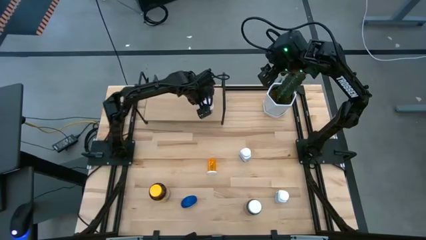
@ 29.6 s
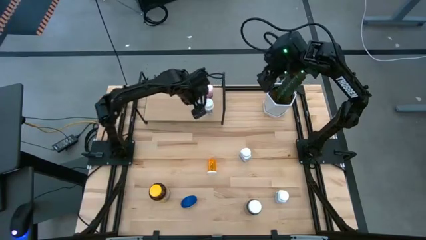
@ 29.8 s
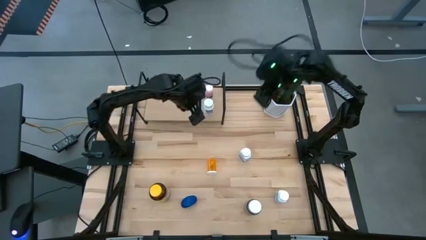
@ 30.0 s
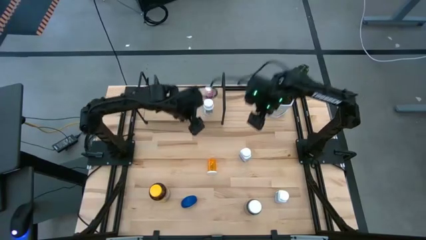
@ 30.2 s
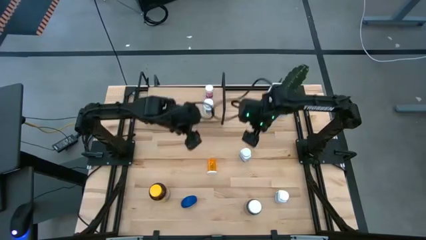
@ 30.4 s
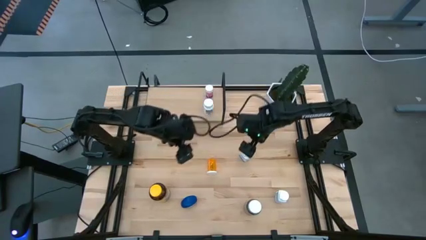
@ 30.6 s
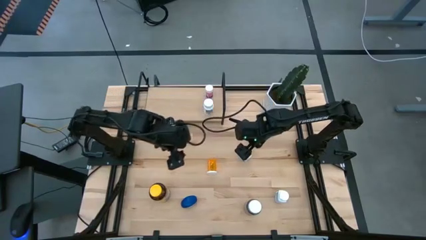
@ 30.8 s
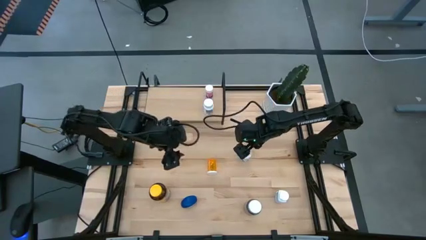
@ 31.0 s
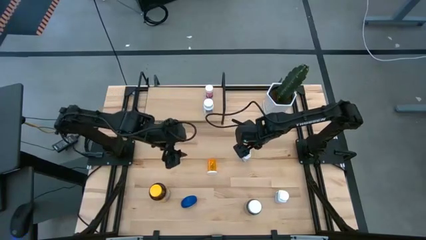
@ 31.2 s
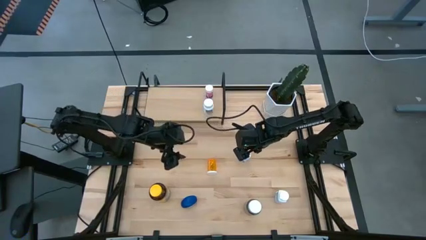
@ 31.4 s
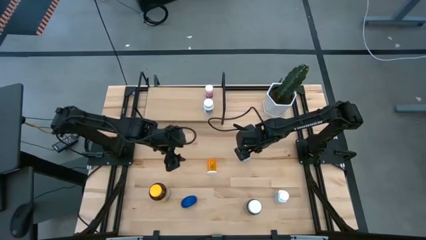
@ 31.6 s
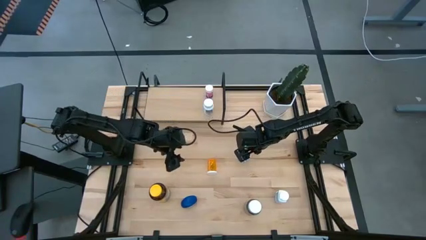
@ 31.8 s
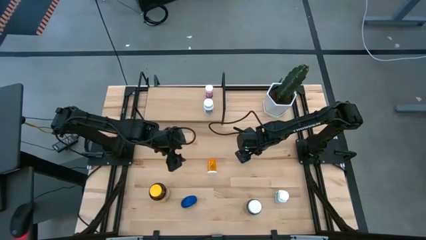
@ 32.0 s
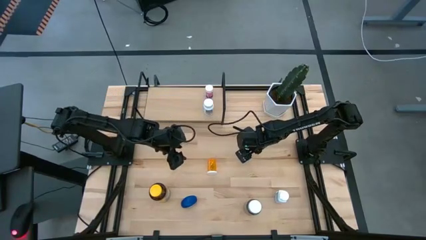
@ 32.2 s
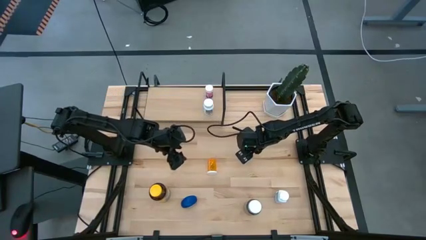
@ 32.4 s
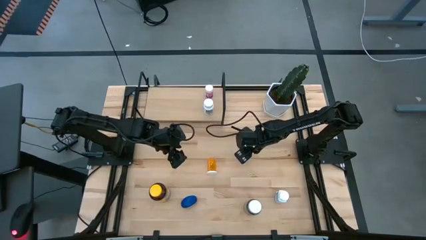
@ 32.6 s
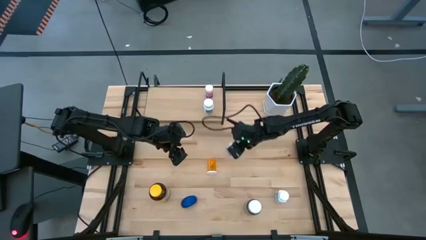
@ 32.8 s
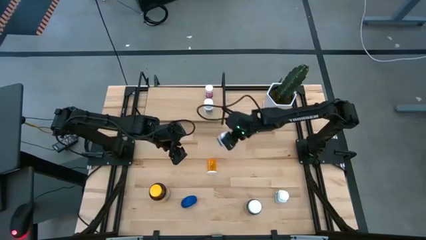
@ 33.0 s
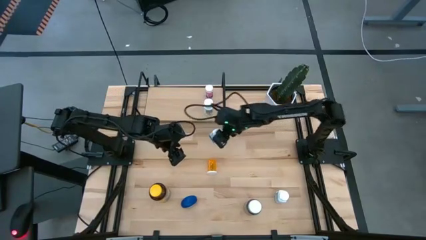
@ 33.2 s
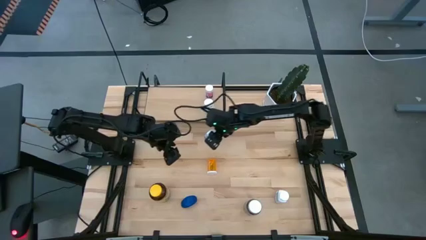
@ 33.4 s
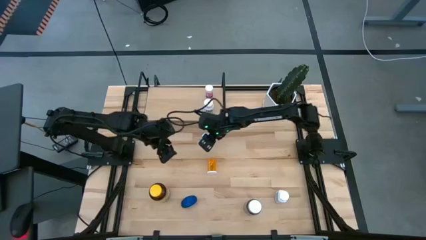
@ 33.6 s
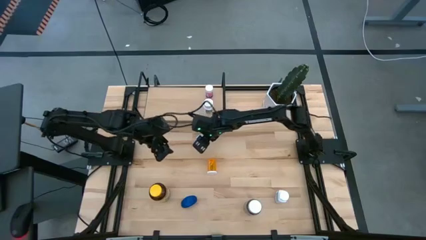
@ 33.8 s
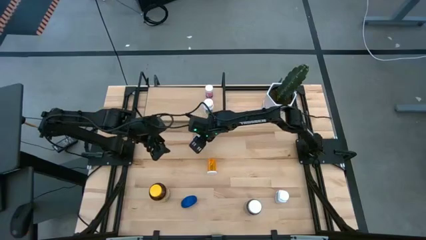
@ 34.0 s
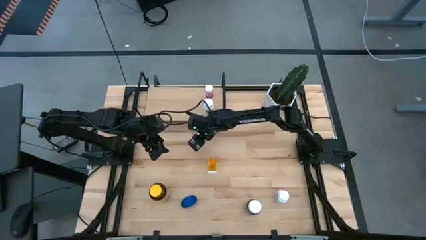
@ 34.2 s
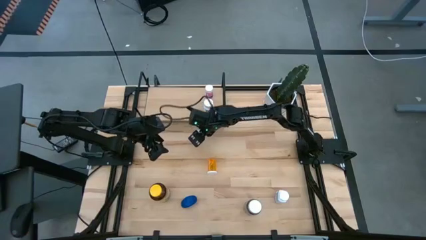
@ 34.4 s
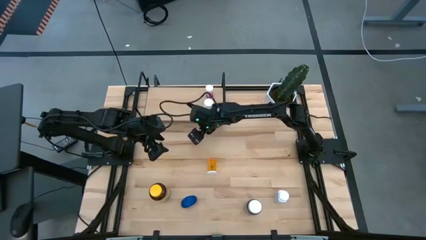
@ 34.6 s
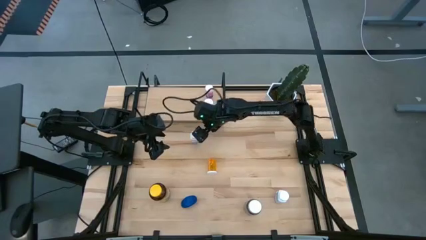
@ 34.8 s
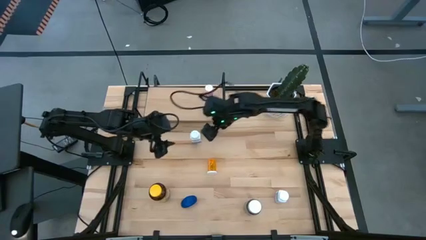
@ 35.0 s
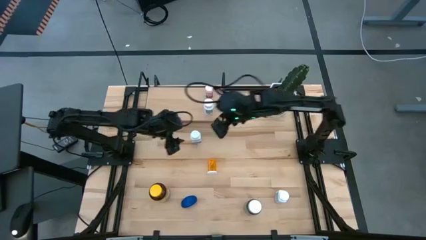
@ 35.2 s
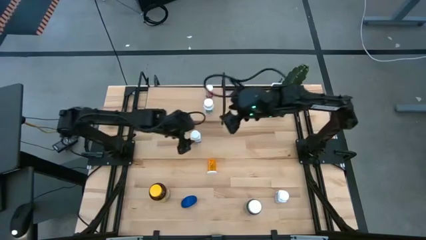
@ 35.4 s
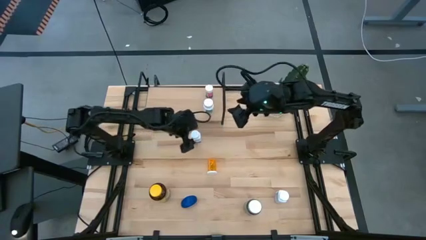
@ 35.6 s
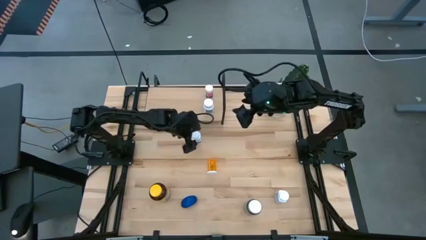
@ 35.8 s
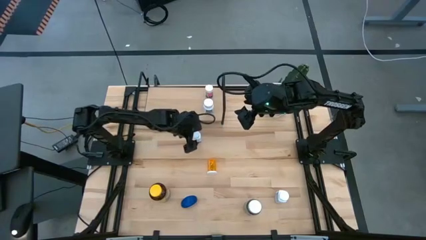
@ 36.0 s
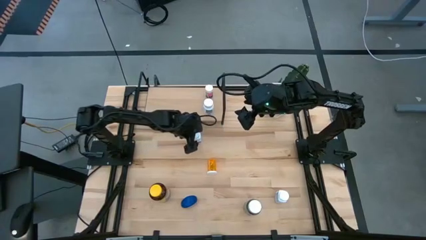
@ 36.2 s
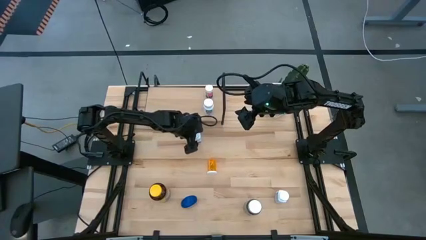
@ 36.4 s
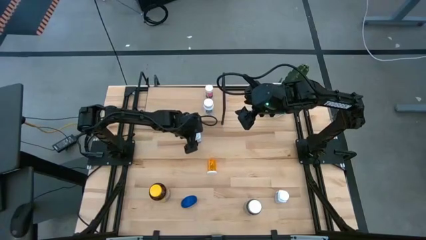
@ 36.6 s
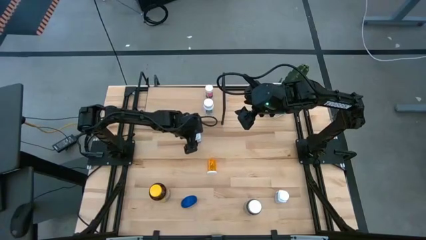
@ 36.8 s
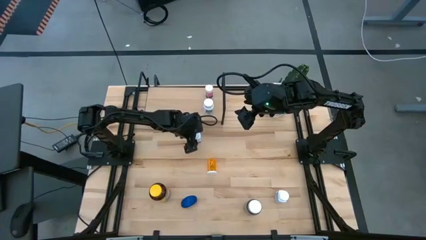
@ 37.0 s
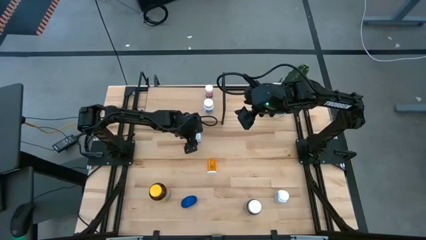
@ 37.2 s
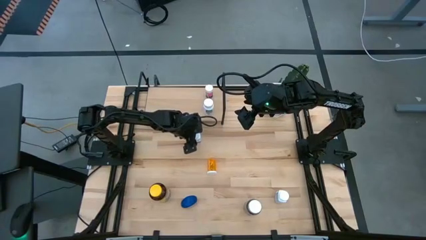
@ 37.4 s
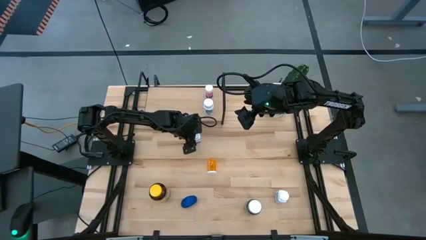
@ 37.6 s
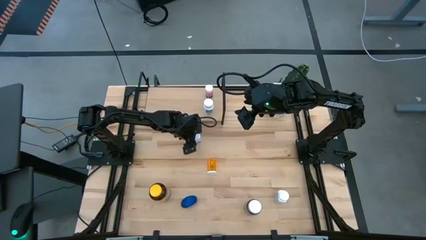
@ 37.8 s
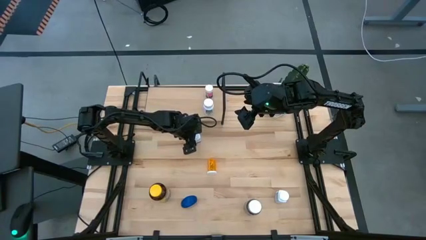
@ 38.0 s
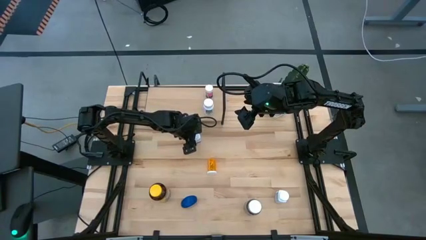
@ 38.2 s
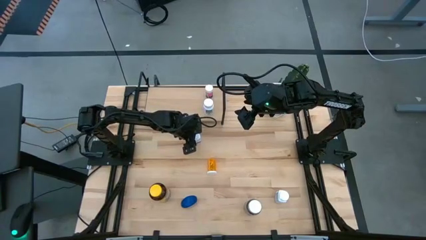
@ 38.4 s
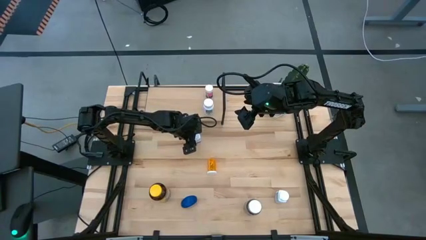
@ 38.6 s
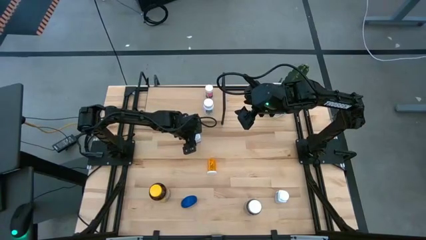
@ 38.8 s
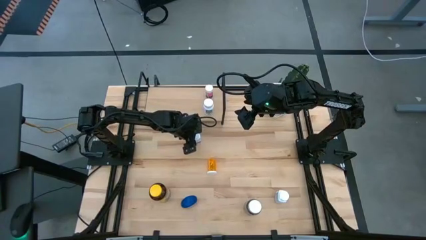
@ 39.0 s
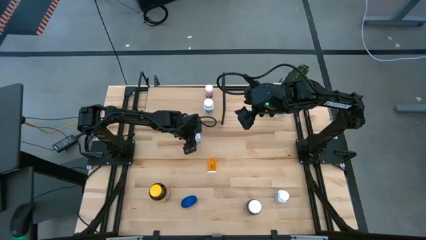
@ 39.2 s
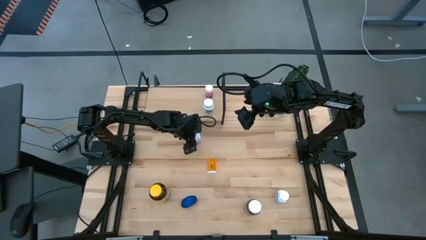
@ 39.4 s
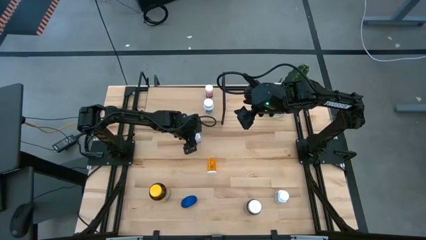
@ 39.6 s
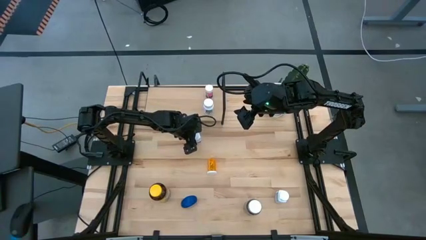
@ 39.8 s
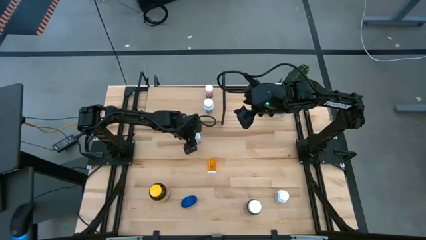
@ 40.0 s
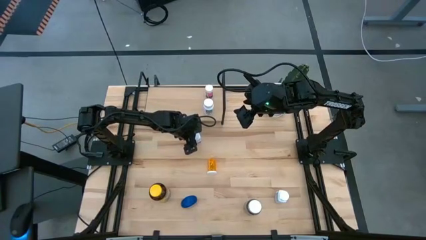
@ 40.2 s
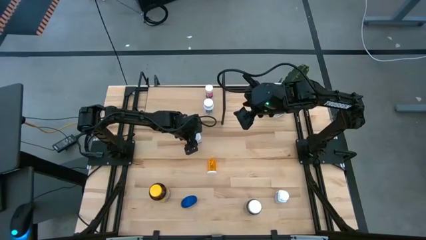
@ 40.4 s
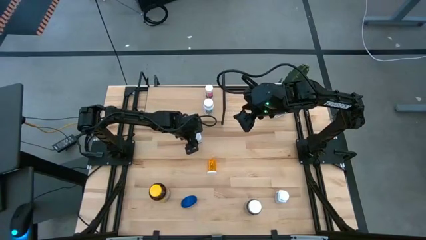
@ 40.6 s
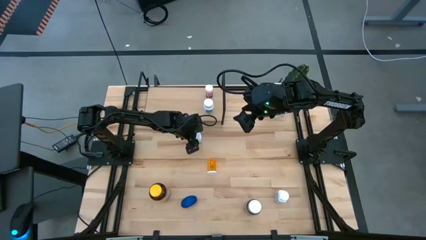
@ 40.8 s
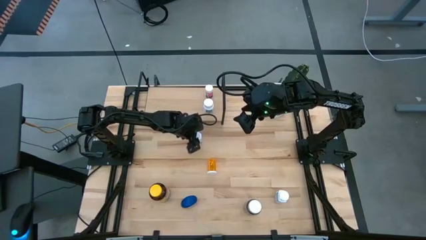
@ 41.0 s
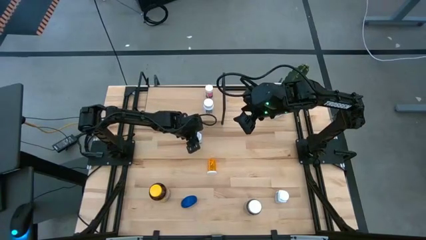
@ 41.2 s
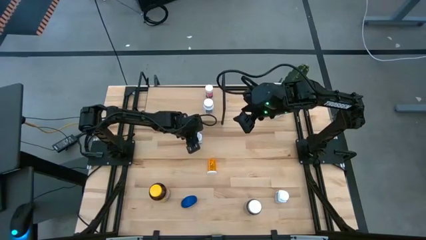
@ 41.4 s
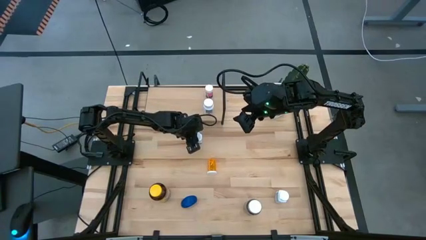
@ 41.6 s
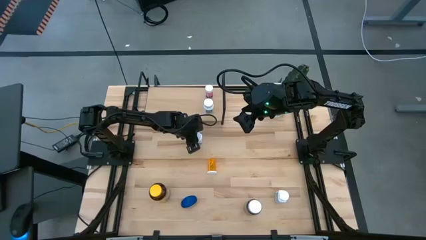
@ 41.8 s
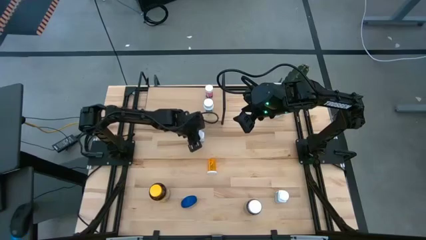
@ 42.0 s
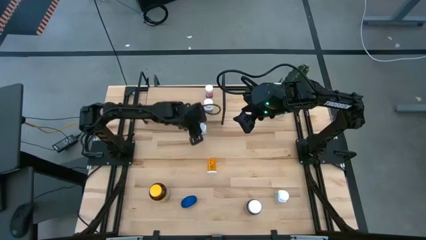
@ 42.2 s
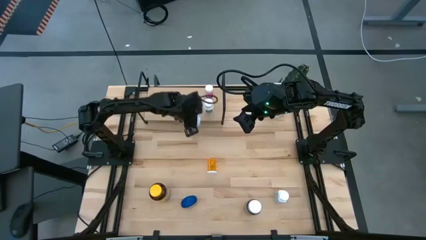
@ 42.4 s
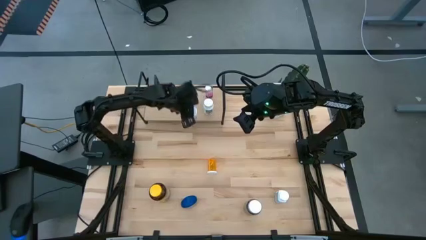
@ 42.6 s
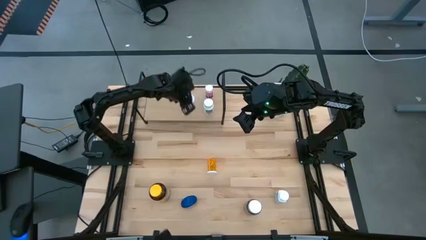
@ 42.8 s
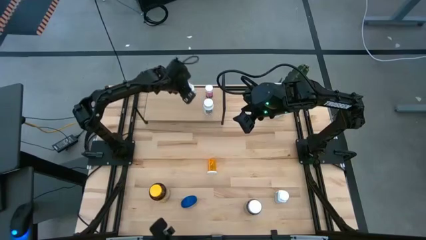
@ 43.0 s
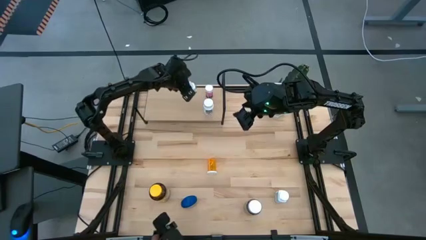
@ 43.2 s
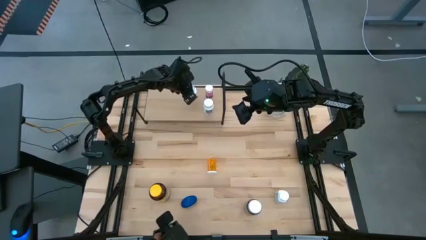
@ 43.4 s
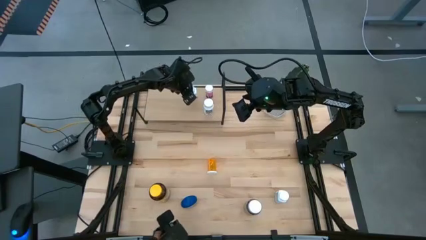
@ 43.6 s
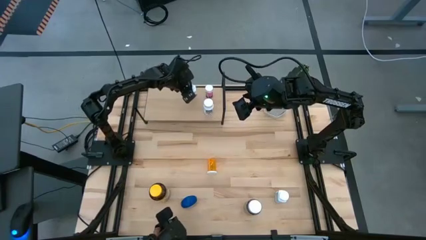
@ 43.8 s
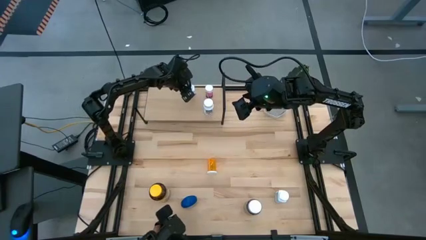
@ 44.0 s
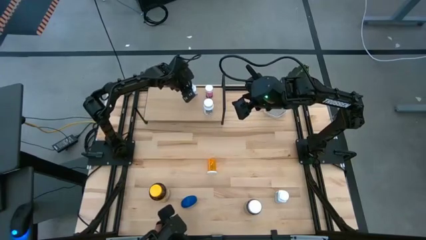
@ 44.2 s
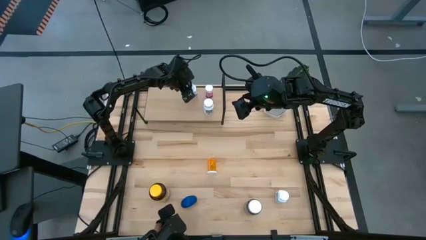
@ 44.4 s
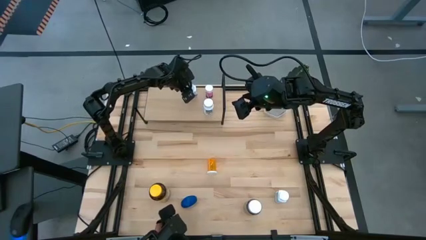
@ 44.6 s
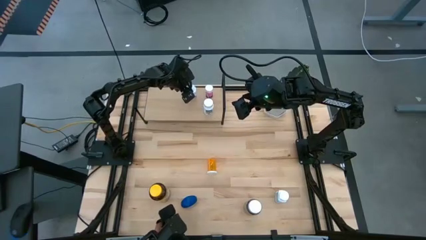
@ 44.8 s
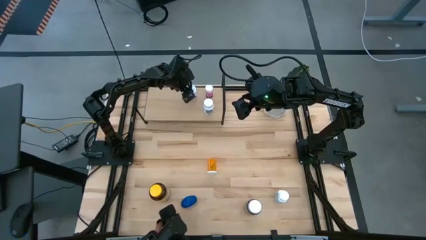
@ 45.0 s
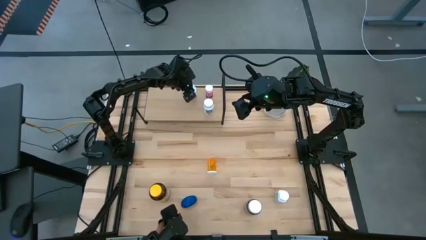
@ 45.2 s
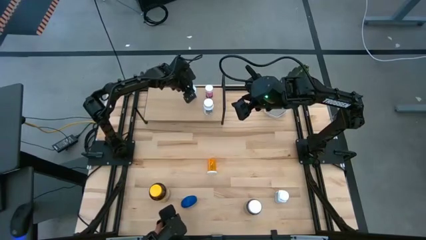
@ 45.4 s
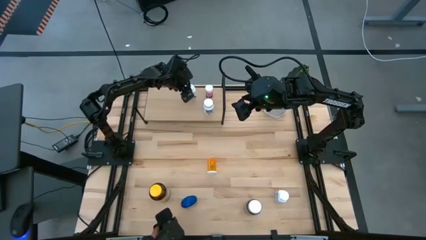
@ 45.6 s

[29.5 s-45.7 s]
Task: Pick and place medicine bottles onto shelf by color
Put the top white pill bottle on the shelf
